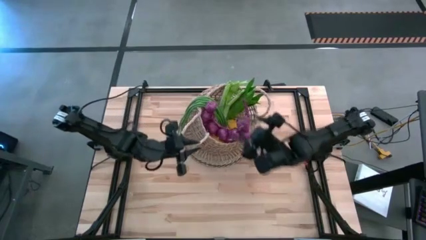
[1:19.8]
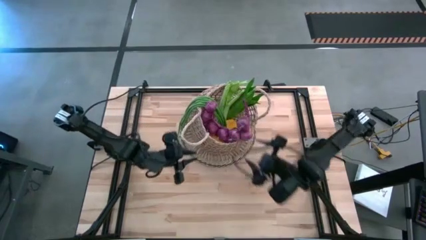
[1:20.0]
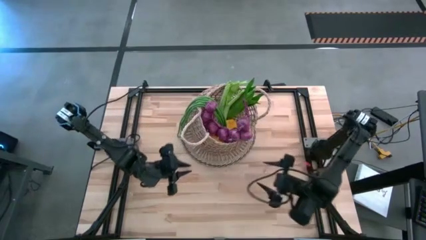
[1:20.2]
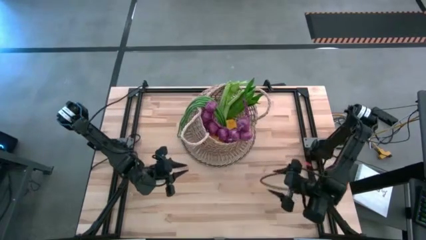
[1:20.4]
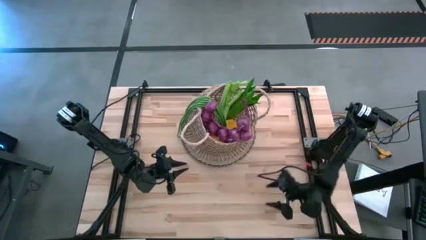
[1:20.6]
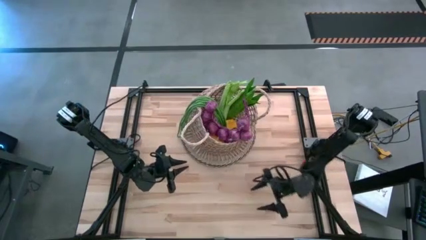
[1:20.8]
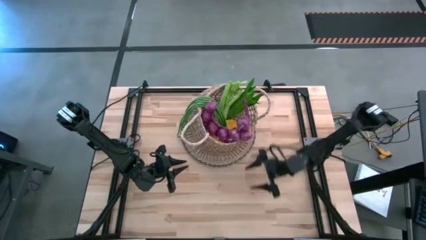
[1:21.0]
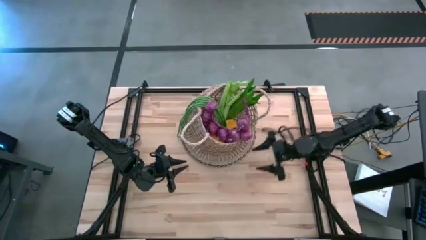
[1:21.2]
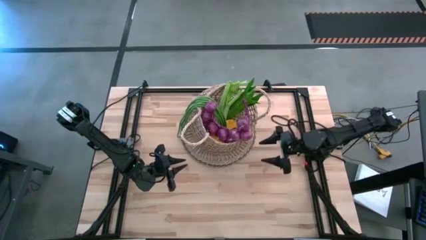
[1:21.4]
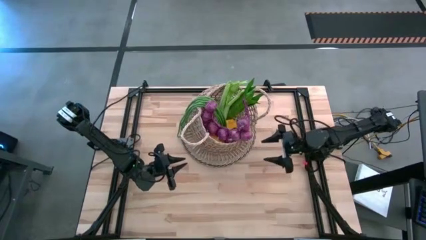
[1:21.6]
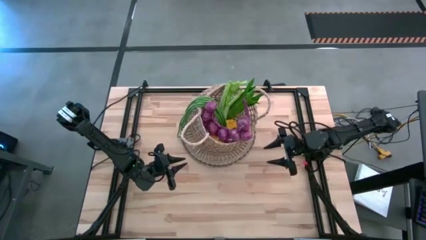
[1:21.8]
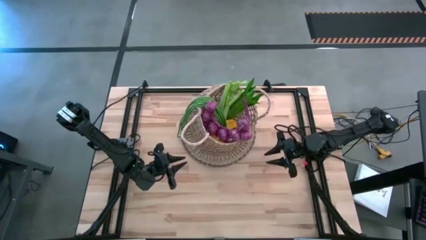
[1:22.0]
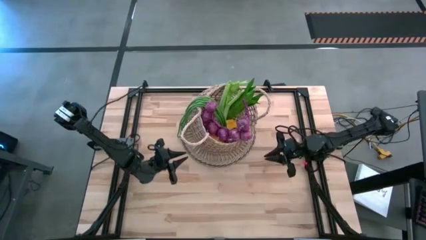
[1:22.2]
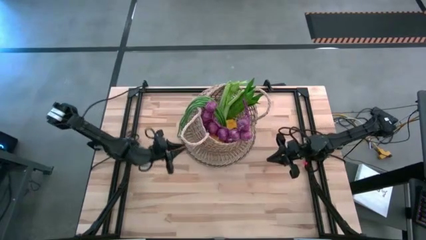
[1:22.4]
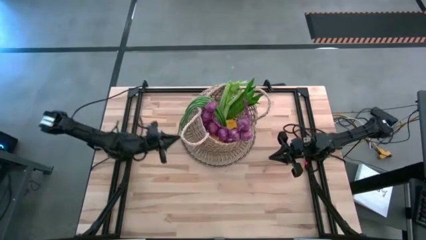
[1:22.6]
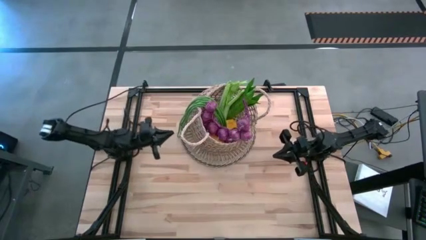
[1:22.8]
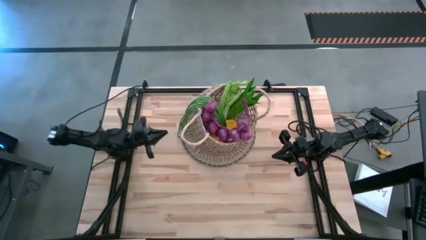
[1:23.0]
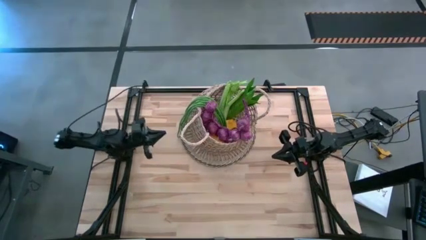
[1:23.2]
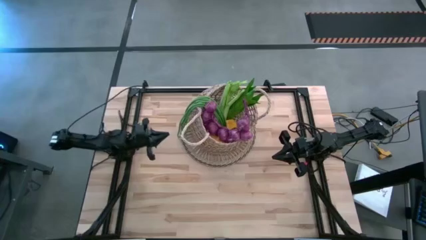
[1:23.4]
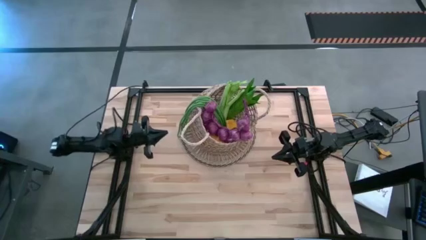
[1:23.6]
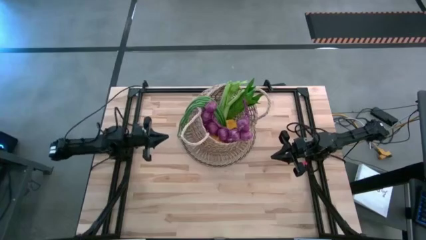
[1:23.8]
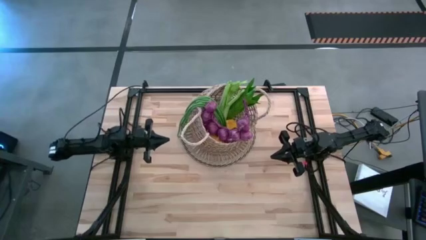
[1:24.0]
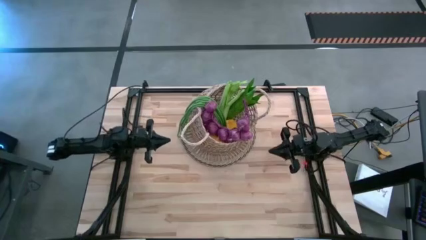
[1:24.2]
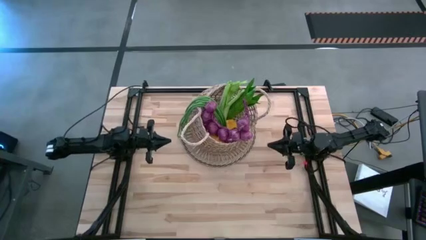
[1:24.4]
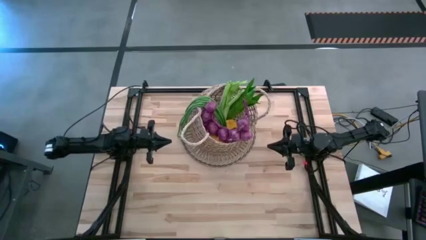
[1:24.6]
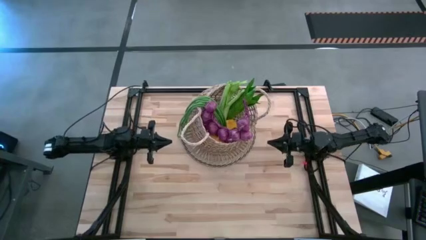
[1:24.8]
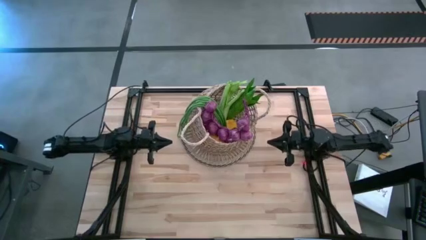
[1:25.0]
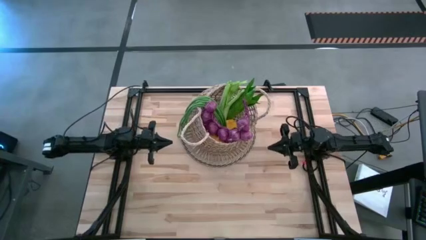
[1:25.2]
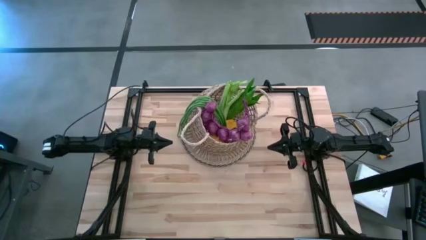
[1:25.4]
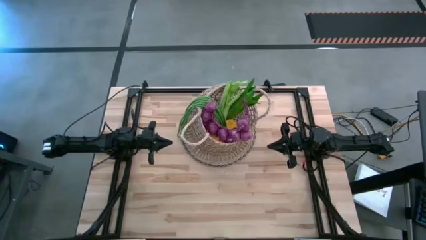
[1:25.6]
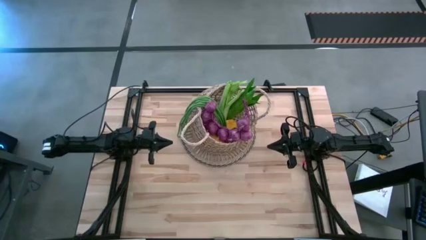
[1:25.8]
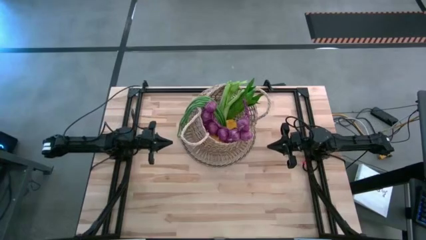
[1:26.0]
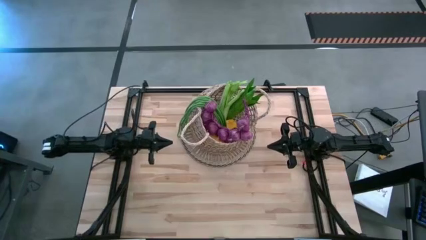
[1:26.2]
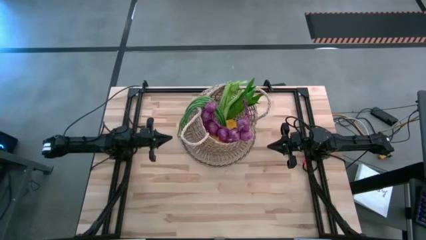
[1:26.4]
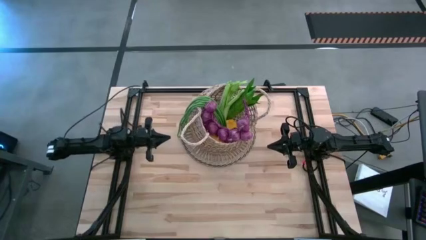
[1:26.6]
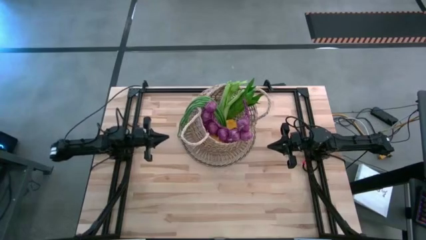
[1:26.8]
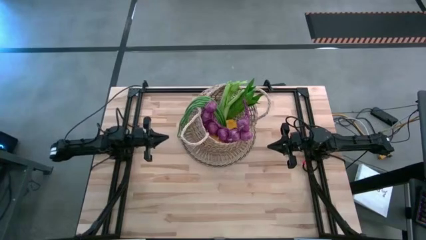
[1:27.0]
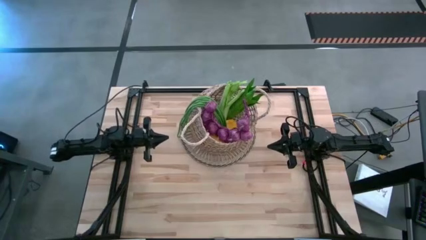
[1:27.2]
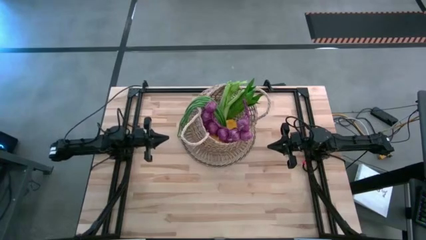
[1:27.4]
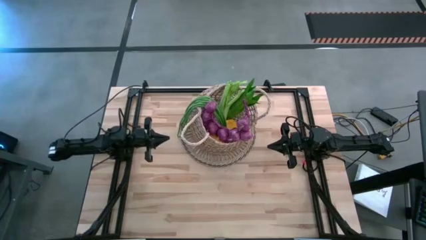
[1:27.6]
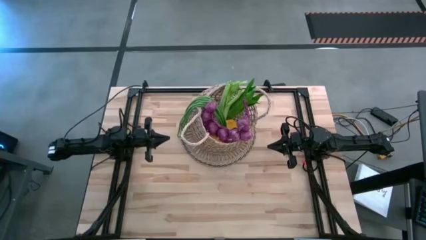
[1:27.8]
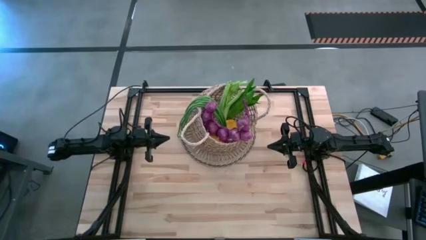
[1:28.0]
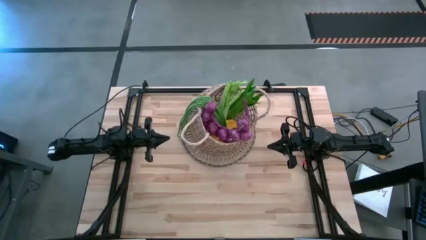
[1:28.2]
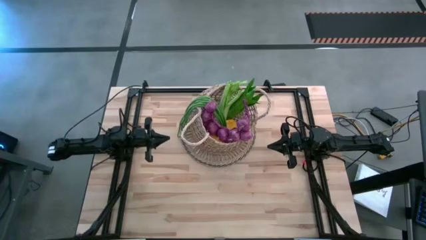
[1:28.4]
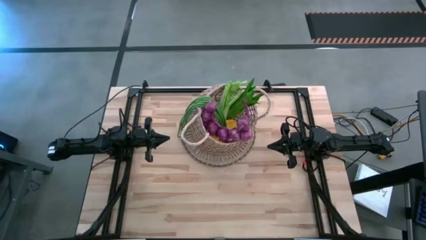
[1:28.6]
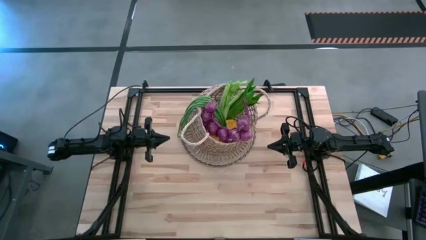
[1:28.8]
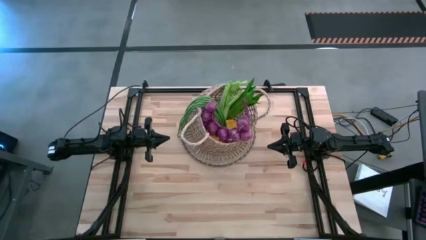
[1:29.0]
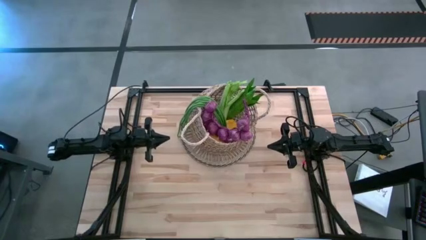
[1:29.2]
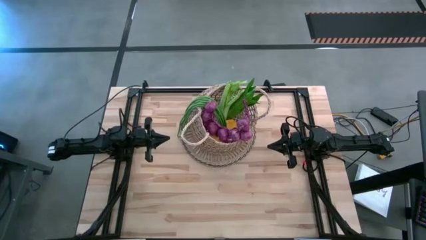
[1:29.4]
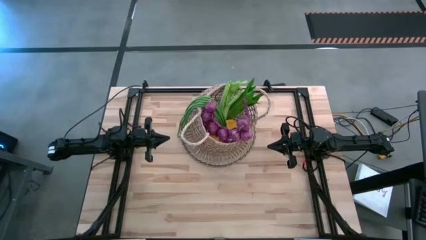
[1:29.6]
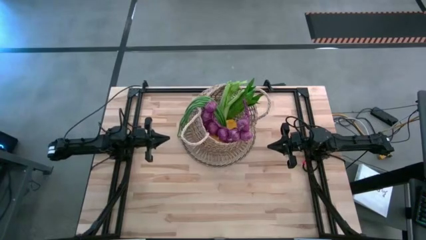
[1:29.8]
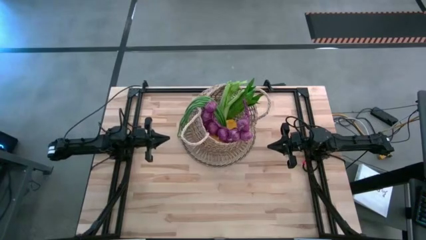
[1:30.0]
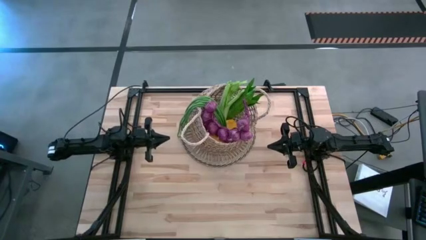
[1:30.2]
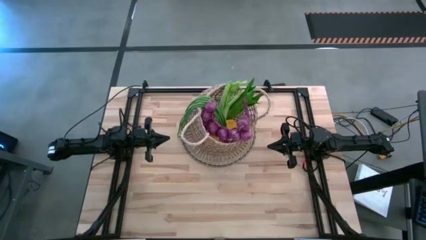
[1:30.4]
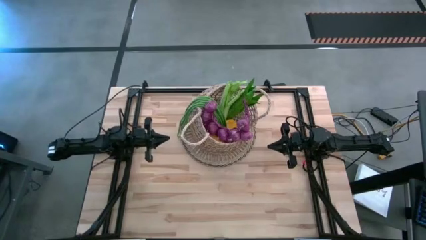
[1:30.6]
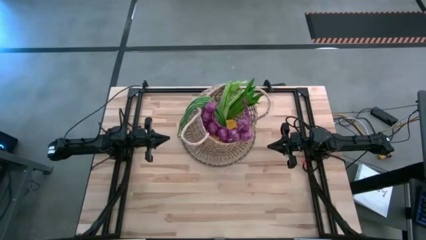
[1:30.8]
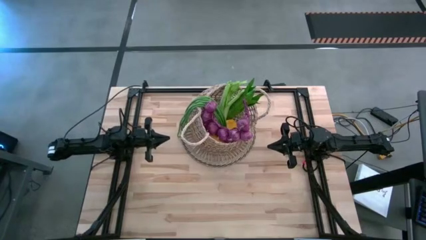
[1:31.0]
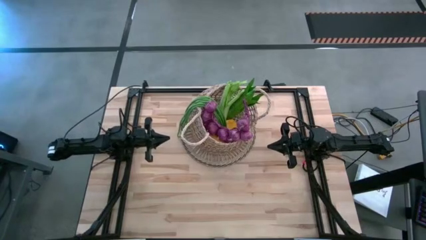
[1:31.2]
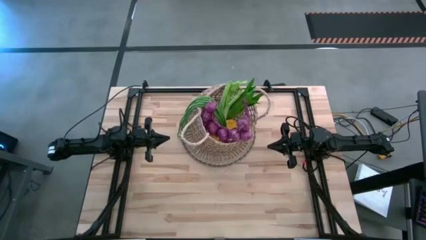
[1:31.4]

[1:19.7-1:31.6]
Task: Build produce basket
Return to Home Position

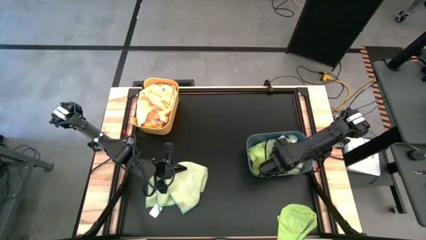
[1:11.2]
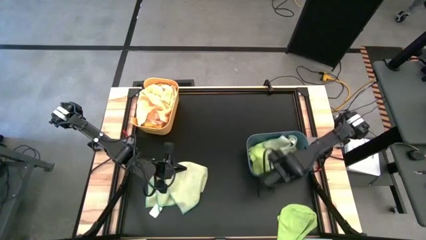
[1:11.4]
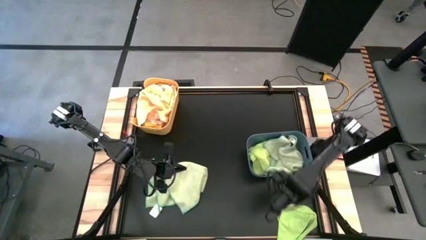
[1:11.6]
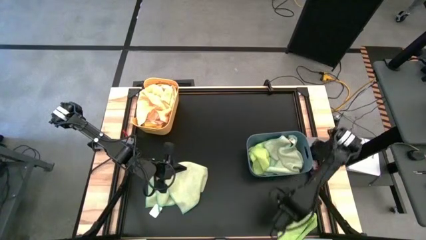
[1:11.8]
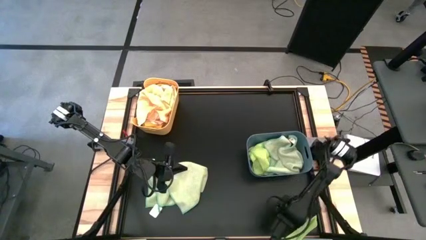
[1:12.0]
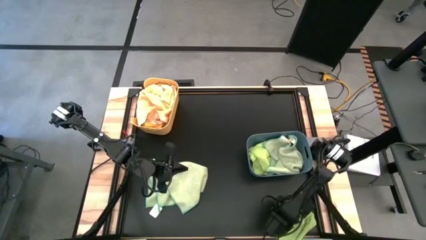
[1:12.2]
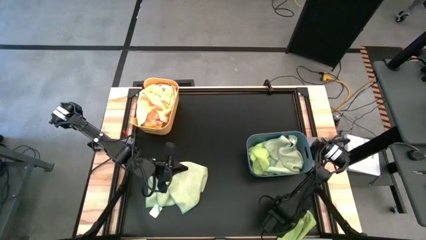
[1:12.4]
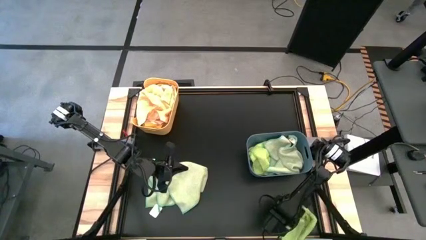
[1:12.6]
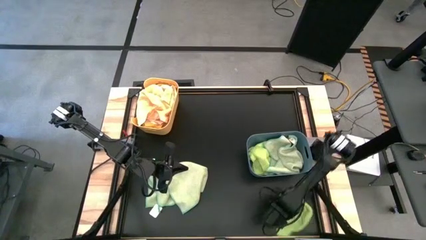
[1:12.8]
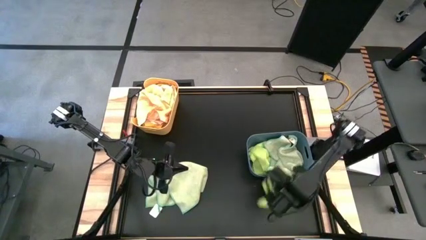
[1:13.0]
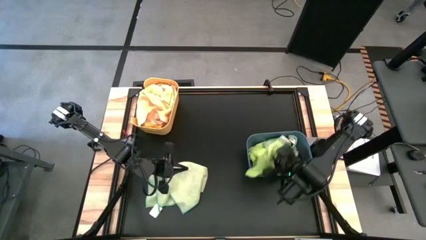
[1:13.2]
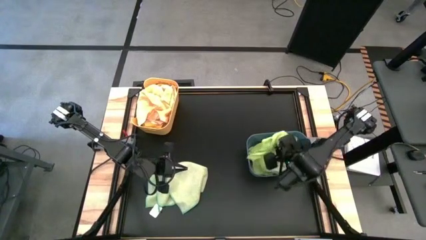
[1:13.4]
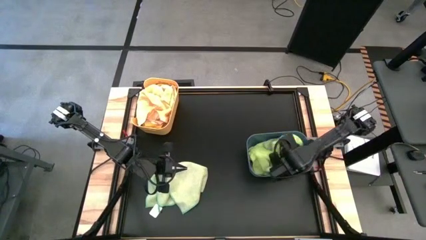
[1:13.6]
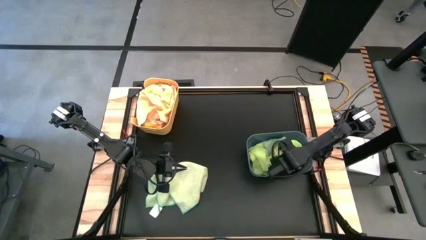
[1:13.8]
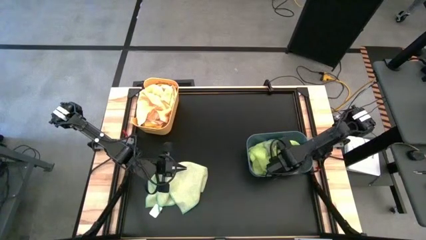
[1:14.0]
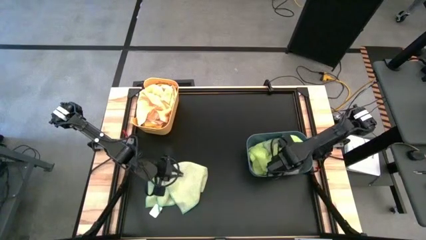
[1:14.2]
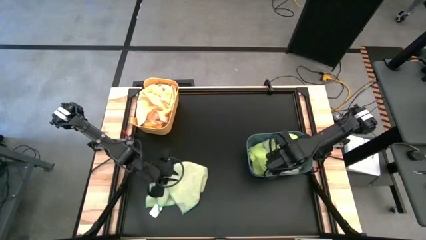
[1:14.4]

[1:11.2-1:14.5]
Task: Sort towels by color in basket
Put the green microfiber cloth into the blue bin
